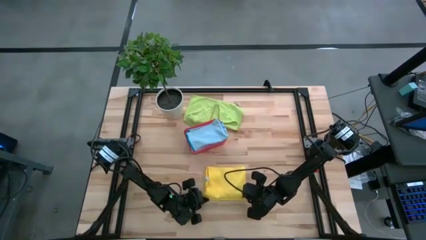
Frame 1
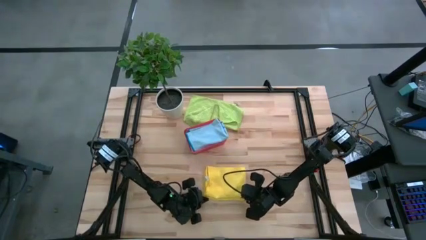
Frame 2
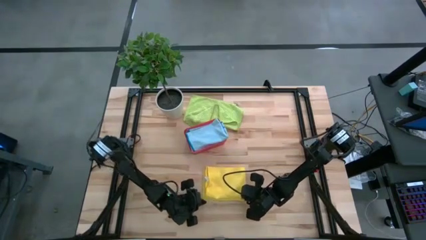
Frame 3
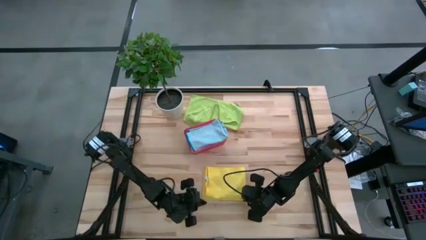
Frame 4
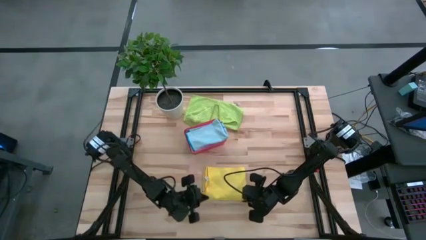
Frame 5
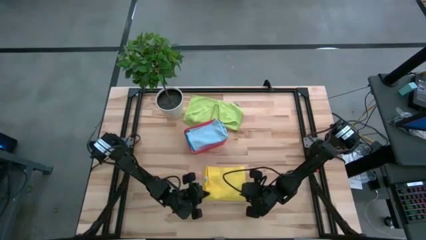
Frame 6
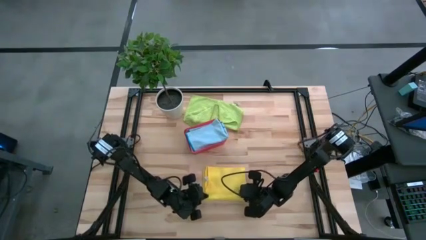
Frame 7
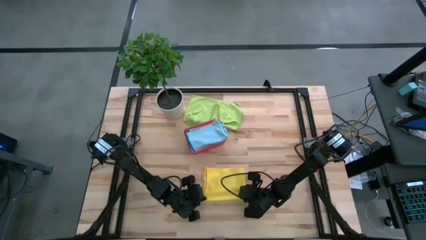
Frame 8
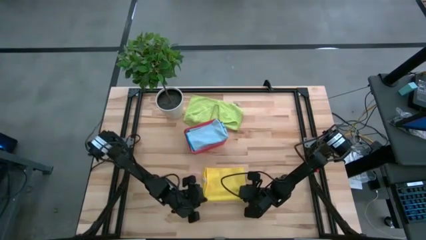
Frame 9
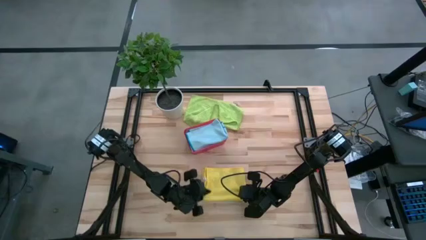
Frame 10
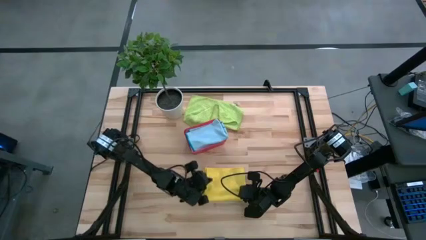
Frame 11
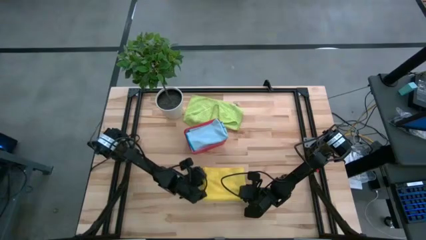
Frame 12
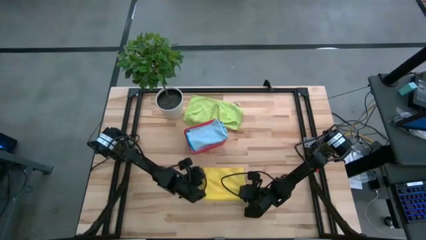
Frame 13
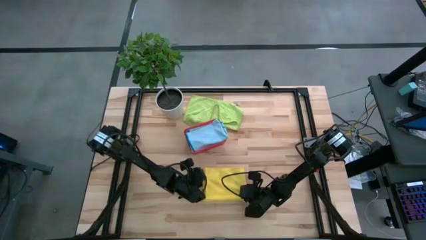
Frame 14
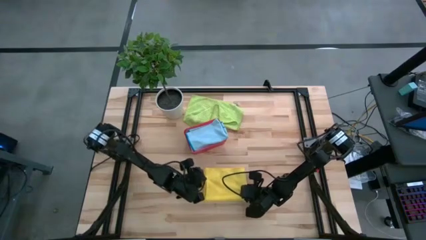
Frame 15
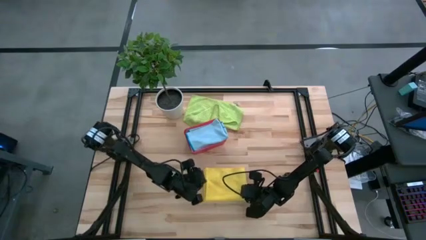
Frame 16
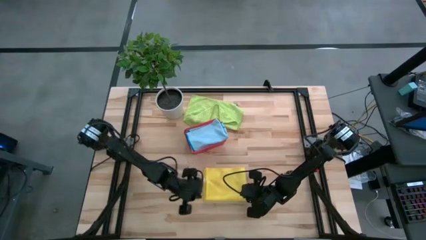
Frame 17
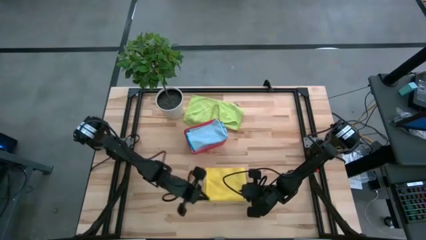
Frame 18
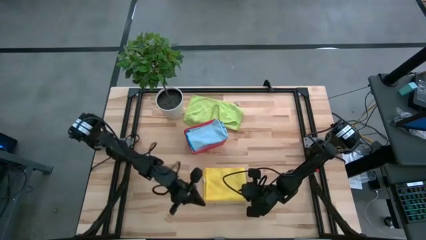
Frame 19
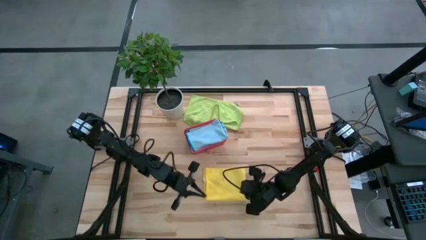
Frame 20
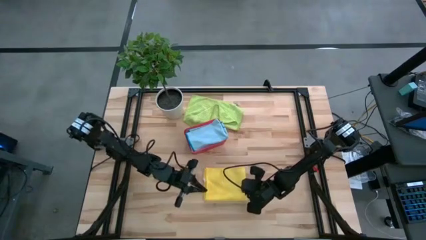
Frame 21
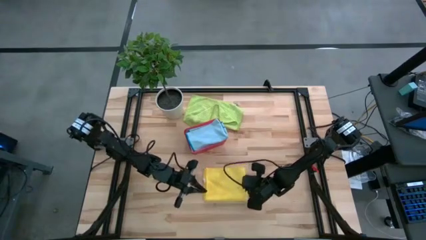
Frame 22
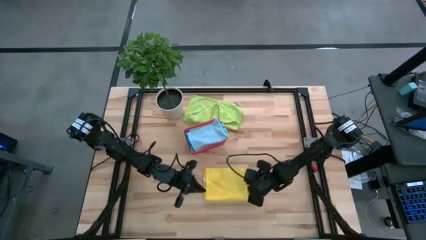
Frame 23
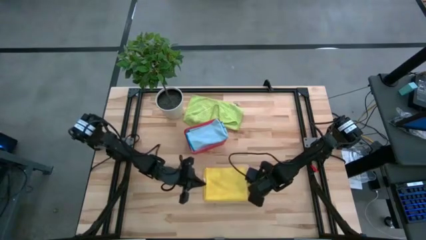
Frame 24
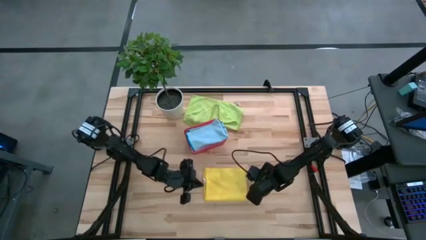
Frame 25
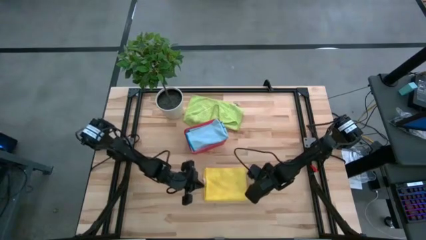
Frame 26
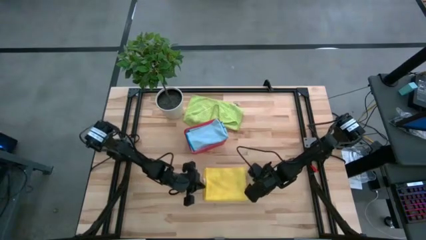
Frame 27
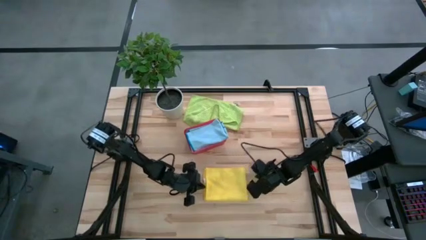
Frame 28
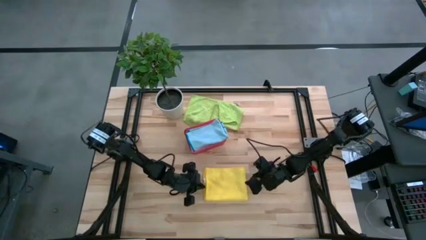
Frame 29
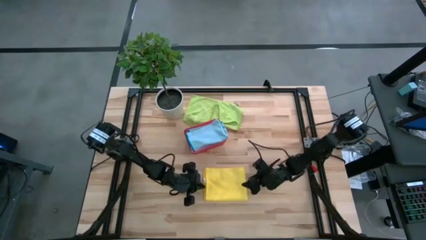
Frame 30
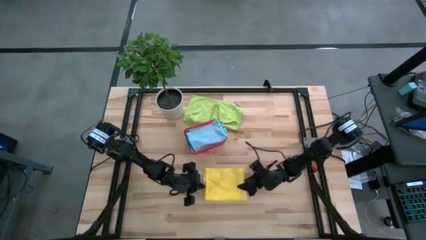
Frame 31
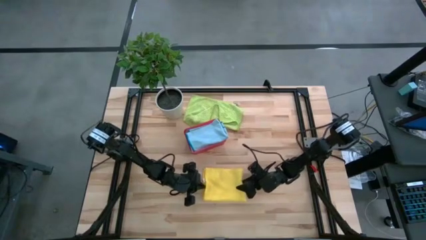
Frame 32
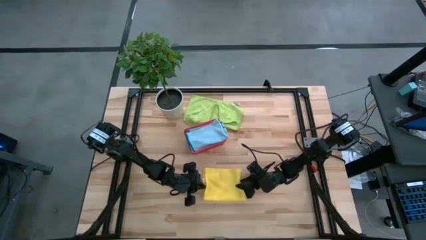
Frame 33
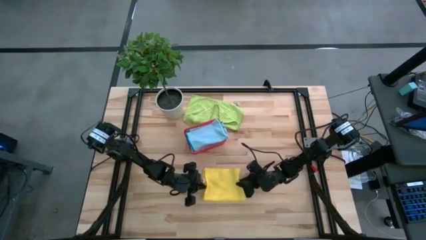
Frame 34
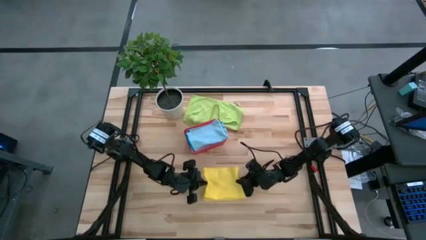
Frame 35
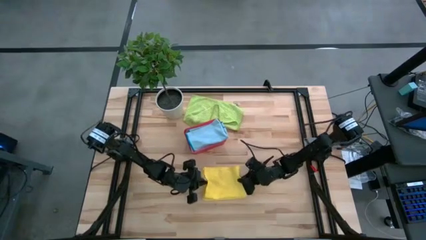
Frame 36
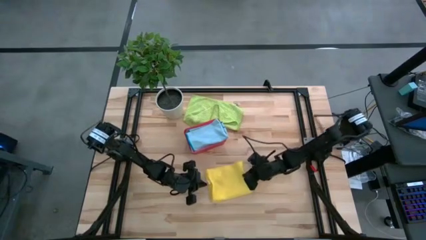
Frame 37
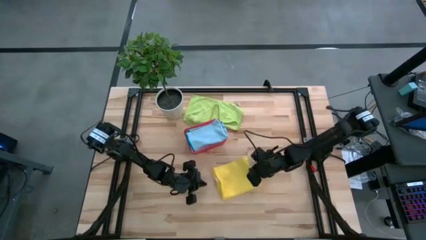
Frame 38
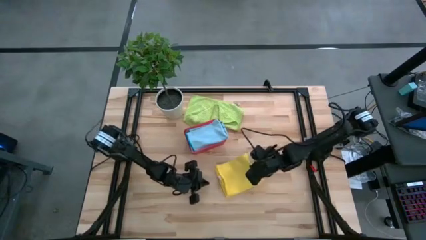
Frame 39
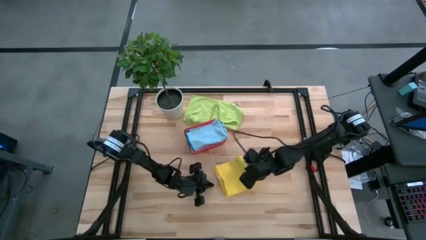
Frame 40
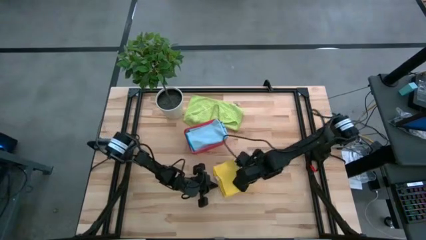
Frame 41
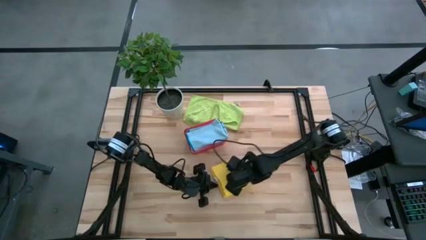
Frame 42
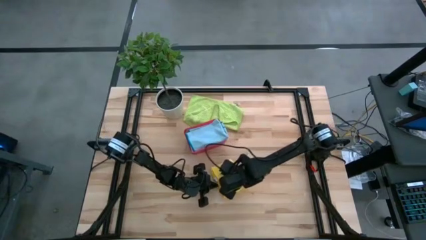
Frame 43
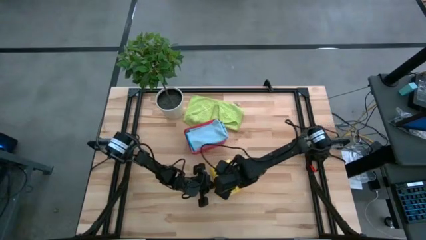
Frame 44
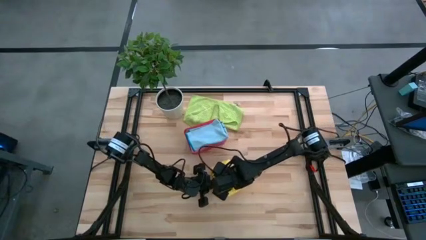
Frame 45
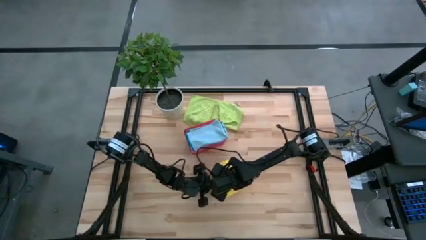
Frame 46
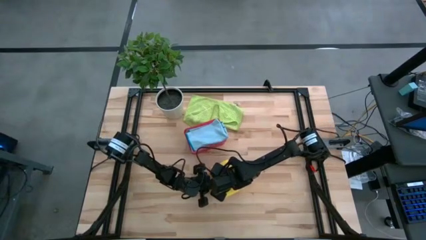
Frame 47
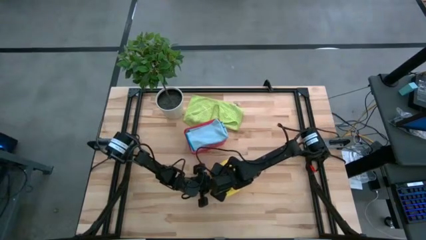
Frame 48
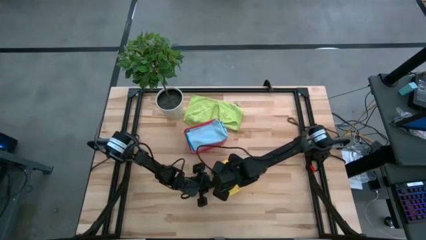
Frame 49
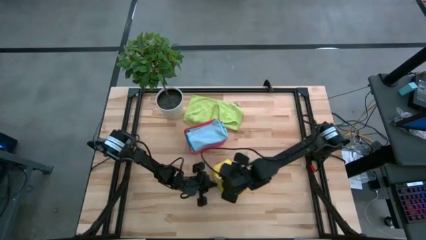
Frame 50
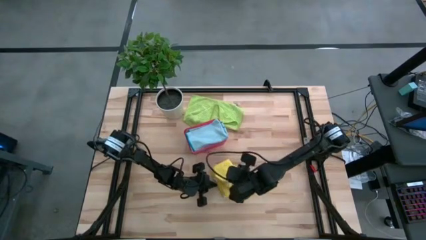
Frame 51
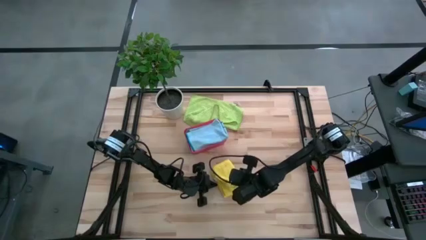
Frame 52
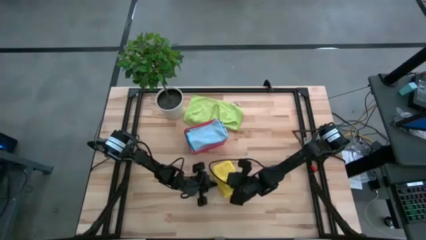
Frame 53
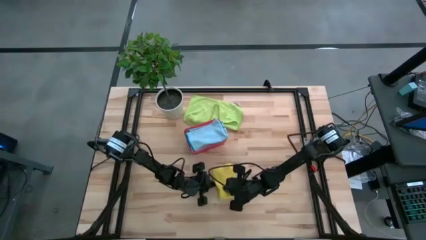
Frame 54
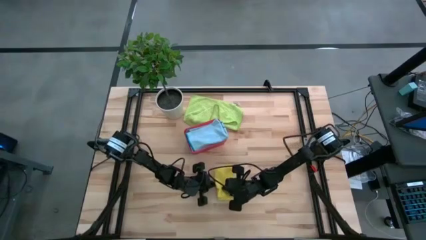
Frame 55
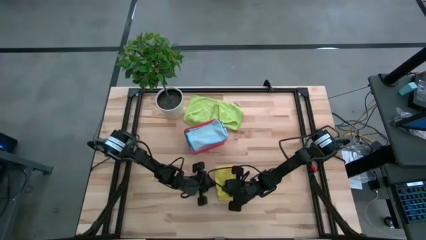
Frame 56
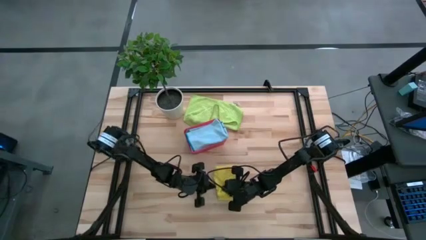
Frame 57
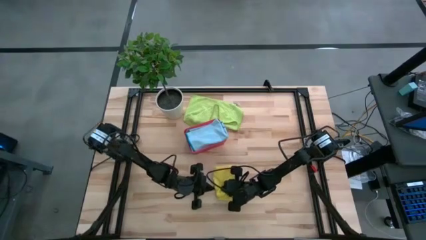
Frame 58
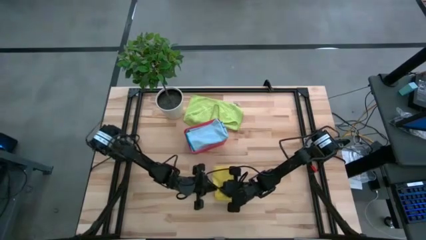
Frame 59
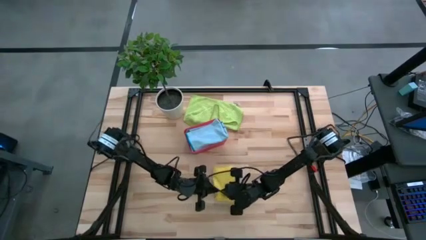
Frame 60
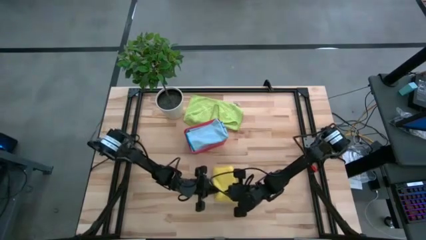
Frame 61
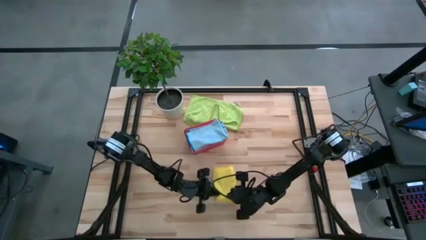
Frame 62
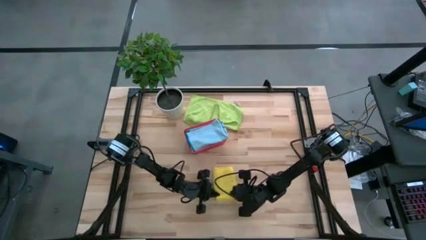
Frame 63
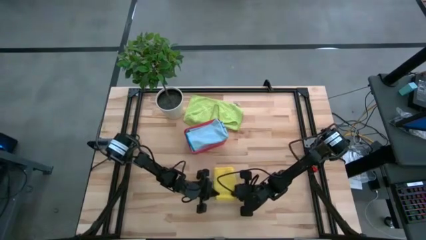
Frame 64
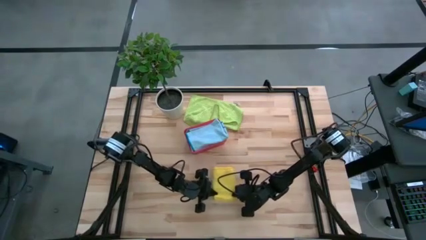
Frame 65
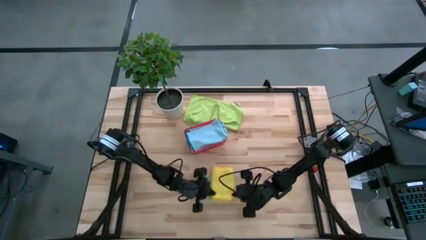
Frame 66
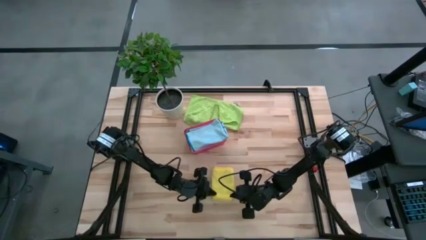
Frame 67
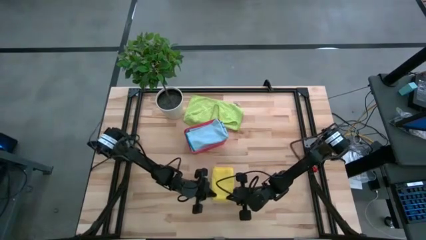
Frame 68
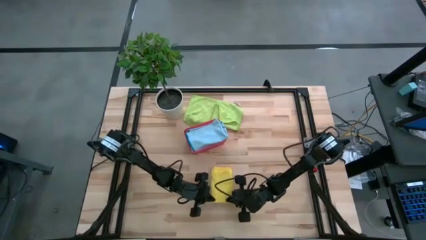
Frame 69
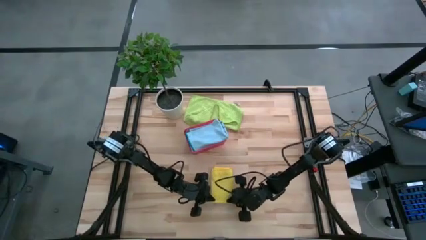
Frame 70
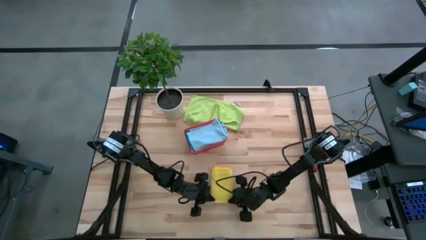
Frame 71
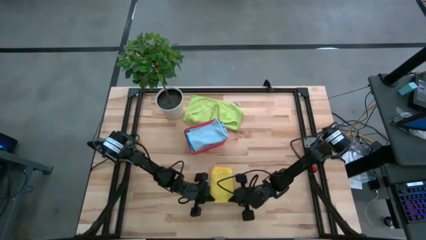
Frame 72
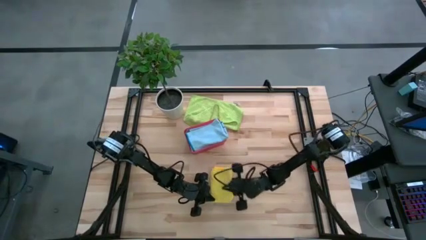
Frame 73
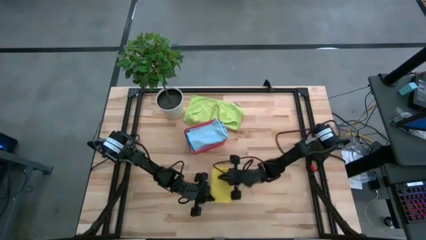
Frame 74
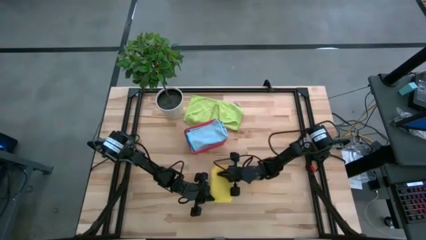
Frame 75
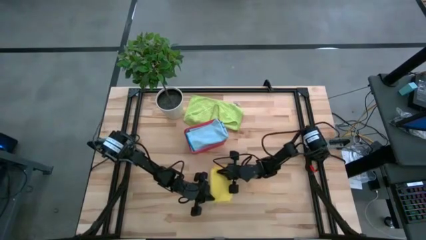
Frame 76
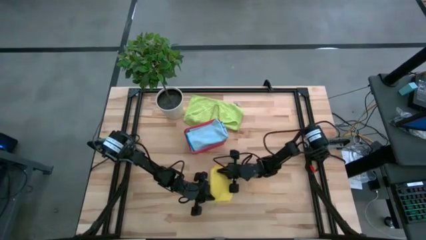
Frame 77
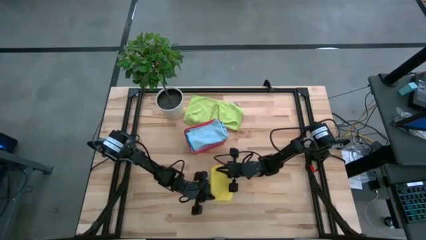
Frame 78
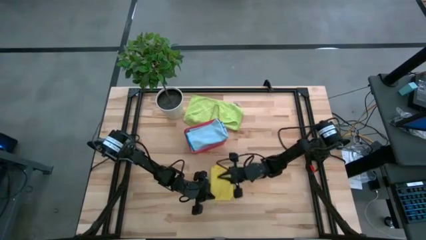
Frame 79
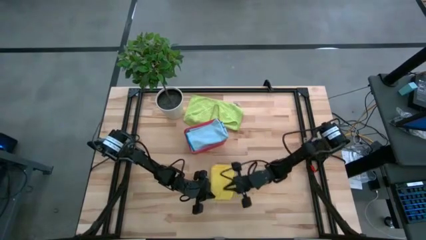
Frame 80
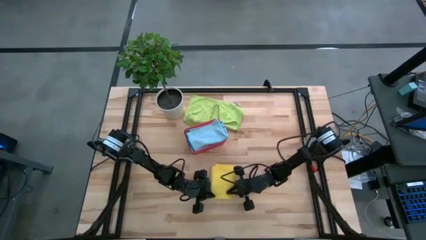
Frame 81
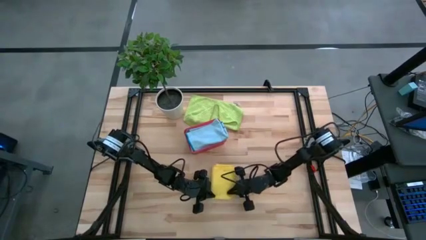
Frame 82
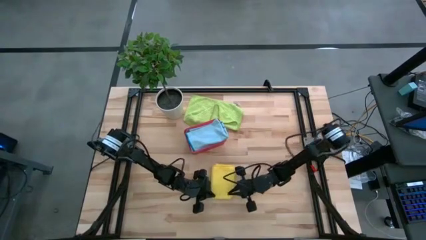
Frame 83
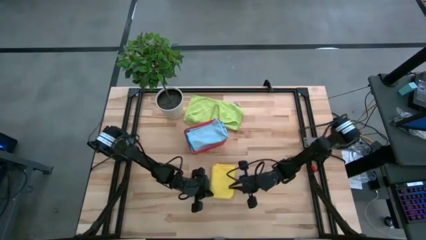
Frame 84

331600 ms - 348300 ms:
Task: Fold microfiber towels
Fold the yellow microfiber cloth
